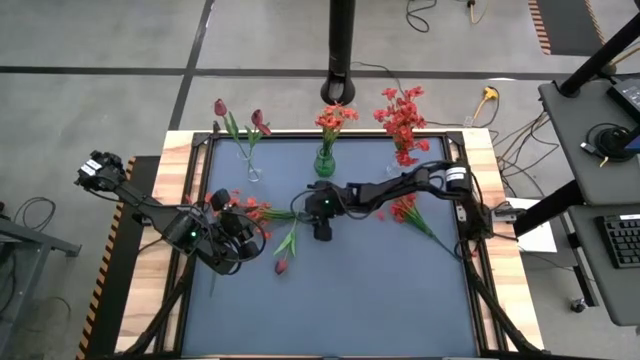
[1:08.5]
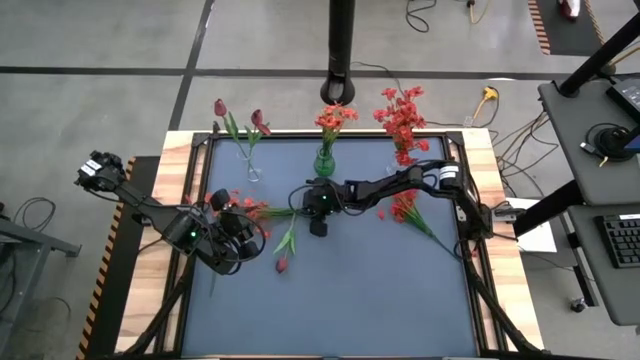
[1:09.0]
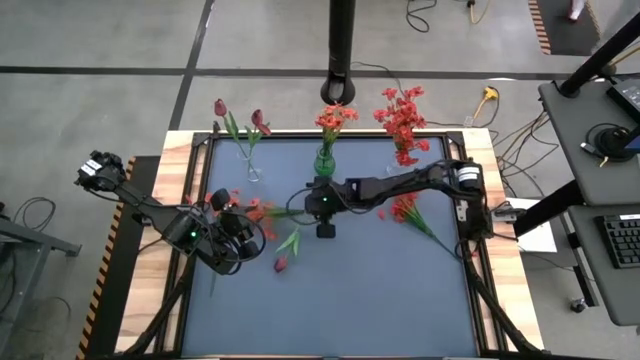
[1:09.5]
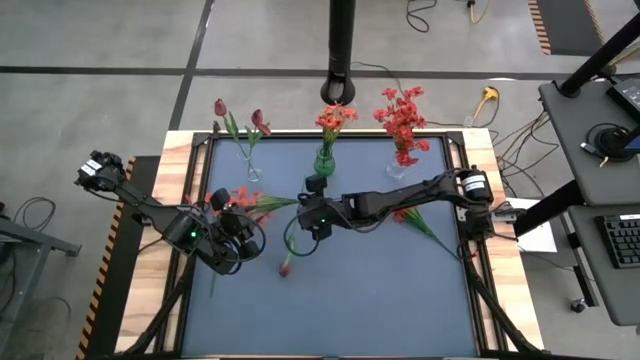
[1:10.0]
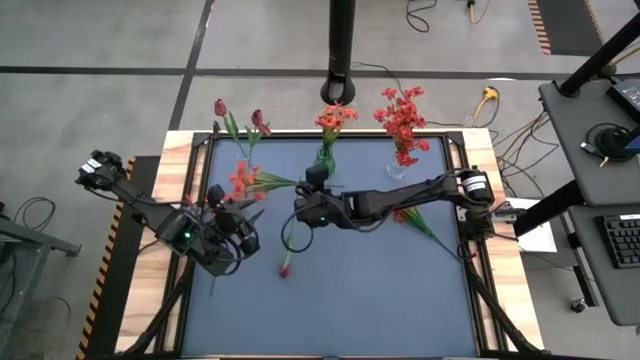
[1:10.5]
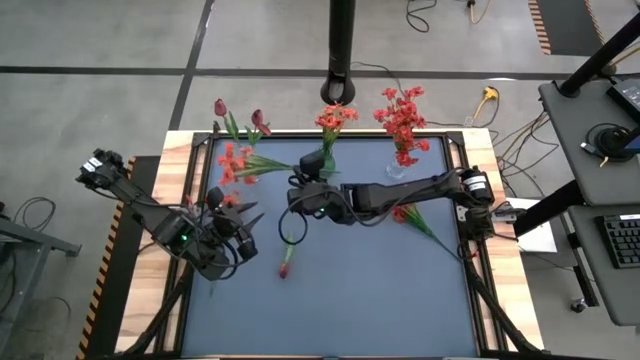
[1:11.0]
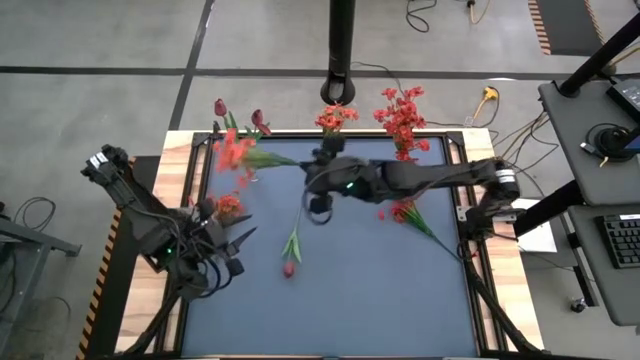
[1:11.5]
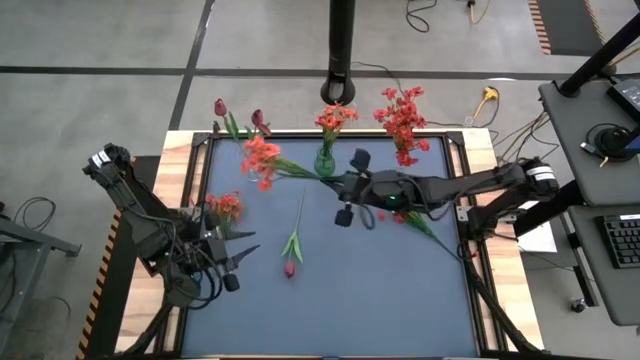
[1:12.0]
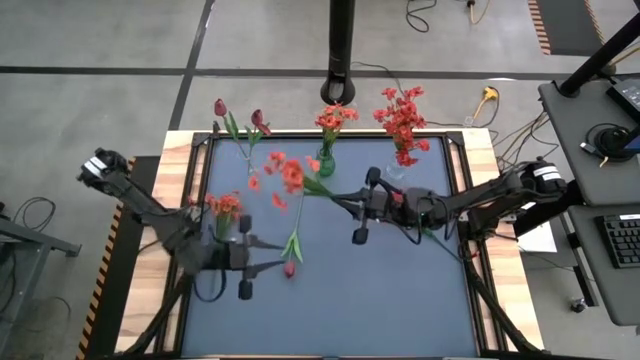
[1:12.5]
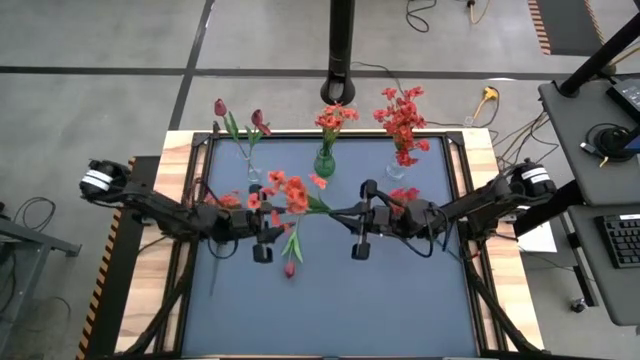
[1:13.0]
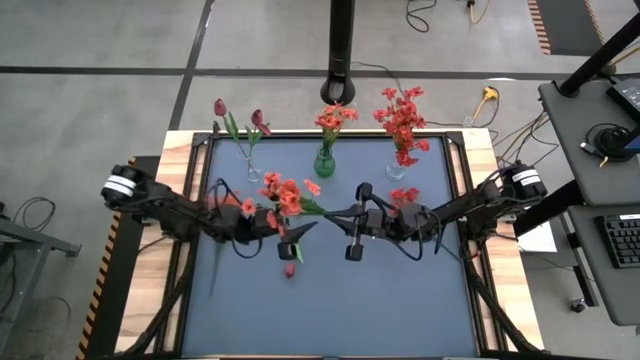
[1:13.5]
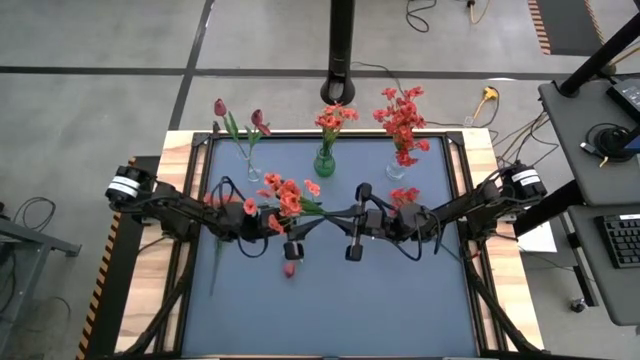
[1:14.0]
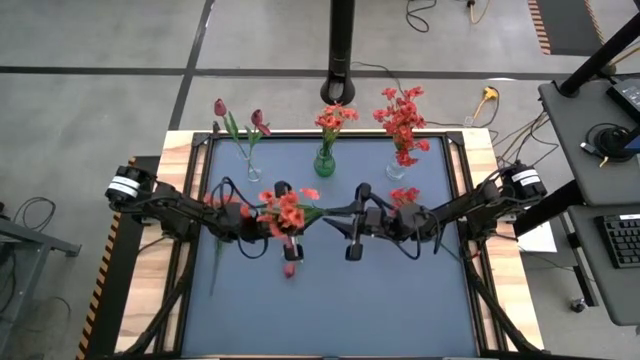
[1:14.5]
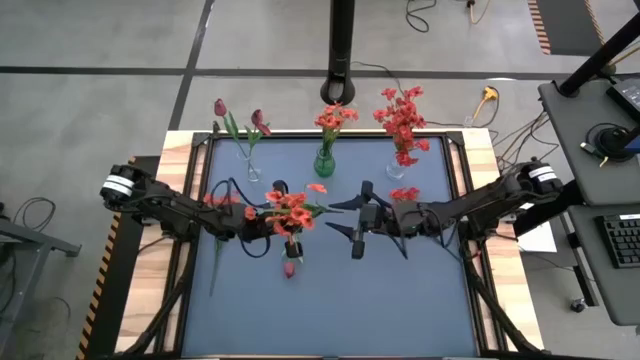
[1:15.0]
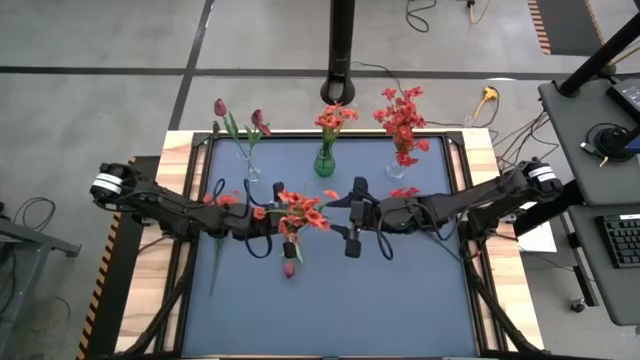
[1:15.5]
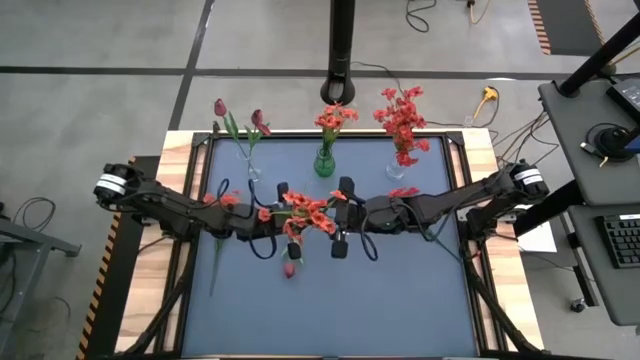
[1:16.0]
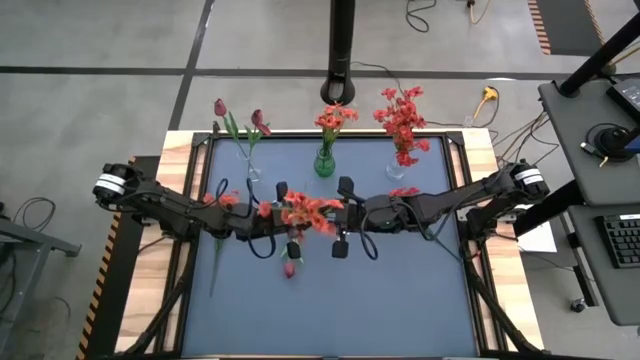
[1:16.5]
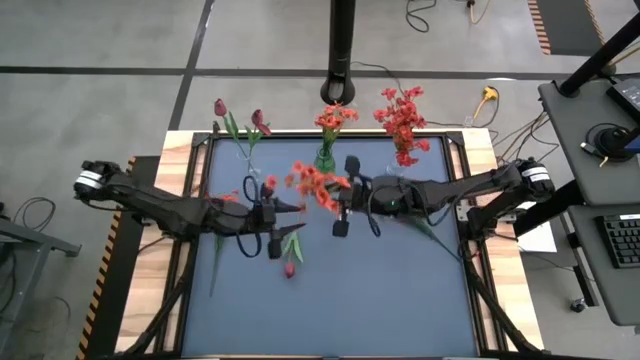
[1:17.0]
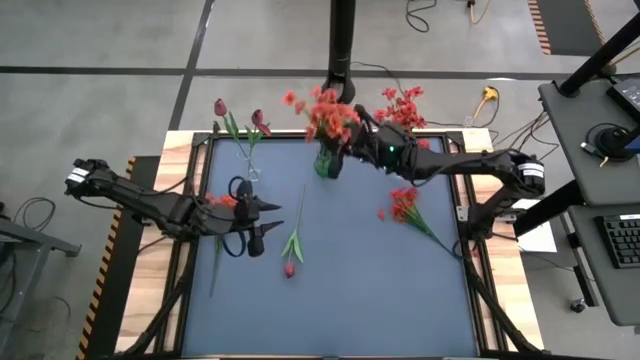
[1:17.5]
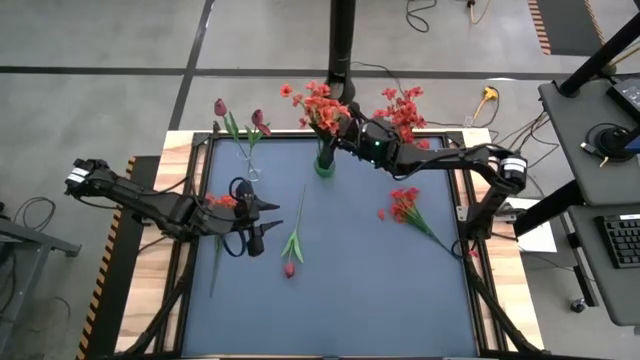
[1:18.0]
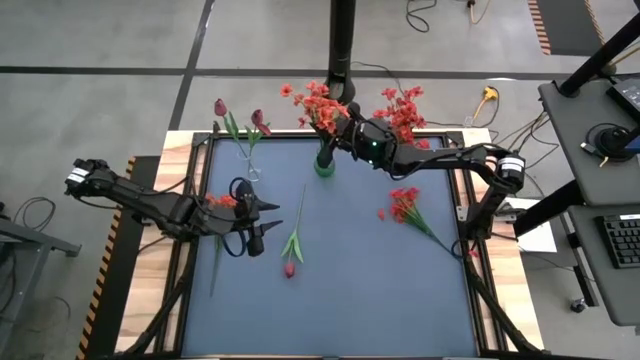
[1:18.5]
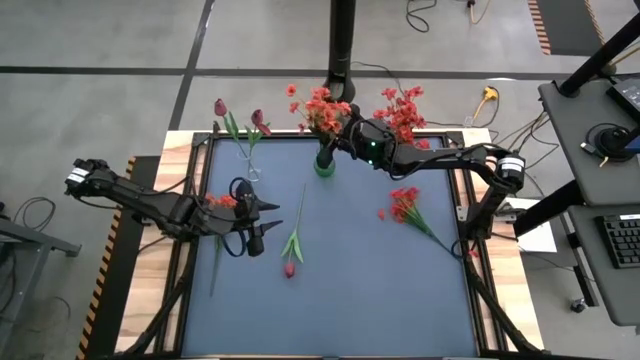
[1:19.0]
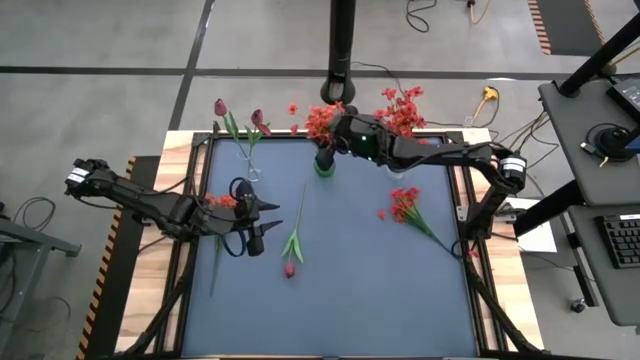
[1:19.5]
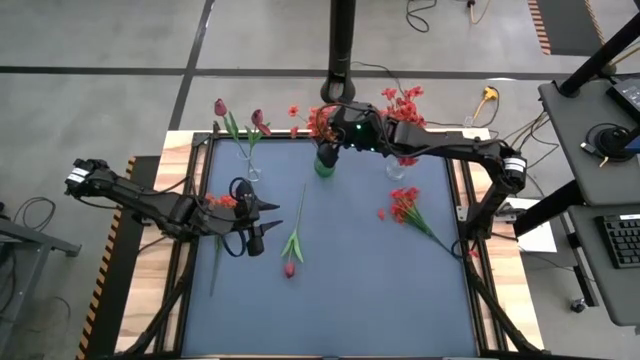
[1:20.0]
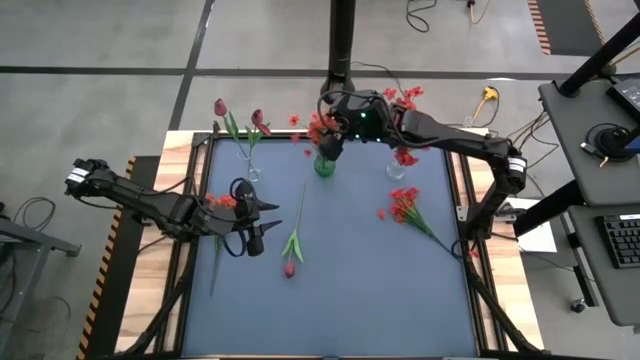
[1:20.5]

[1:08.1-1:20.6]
Task: Sort flowers into vase by color
Put the right orange flowers into the green vase

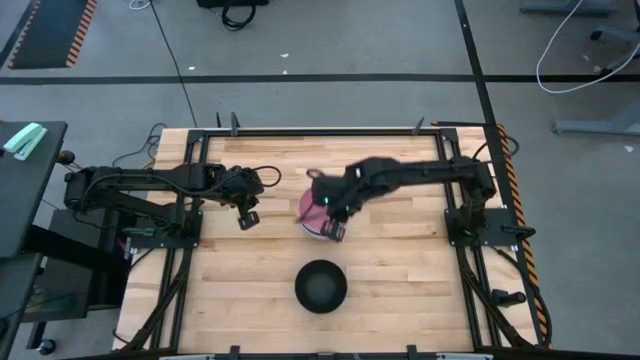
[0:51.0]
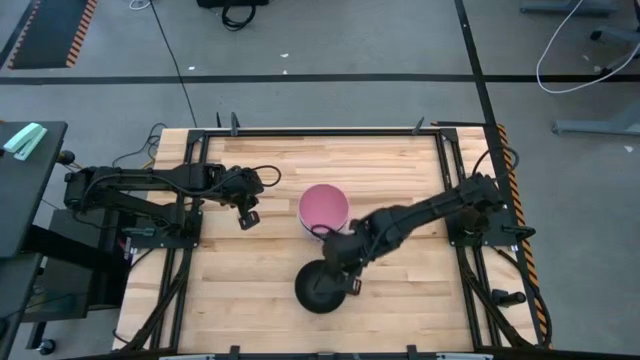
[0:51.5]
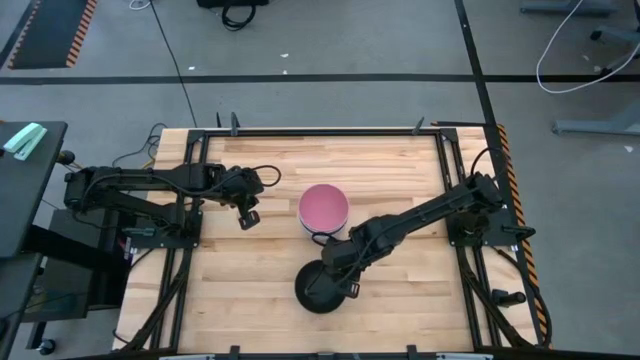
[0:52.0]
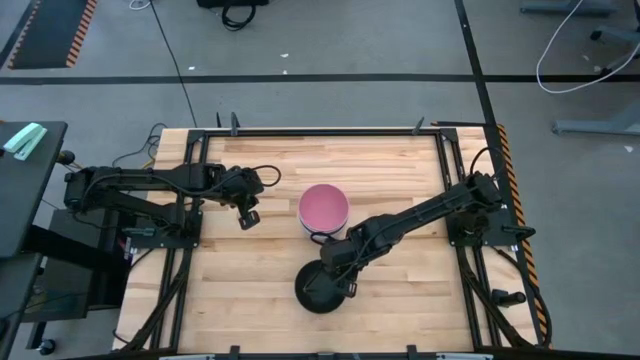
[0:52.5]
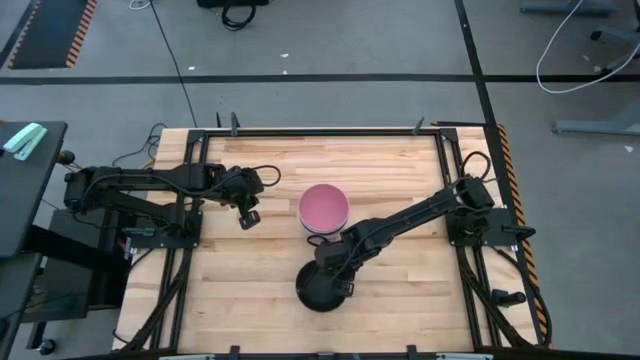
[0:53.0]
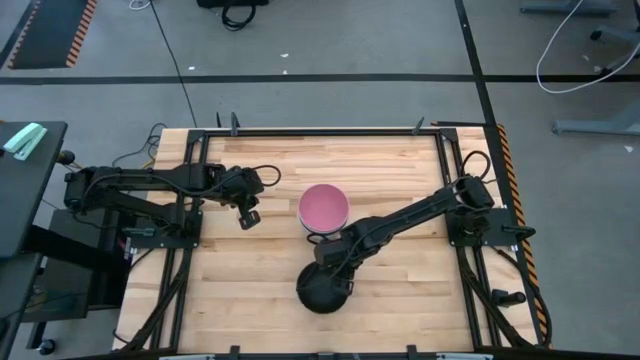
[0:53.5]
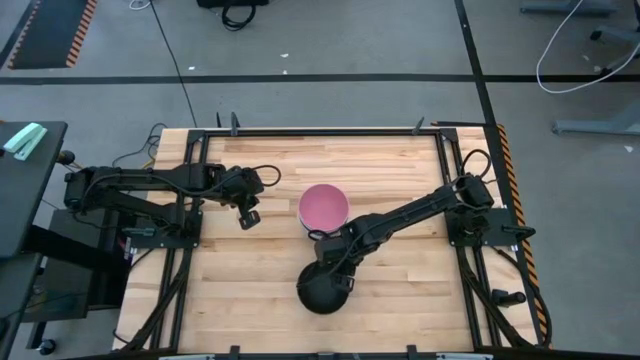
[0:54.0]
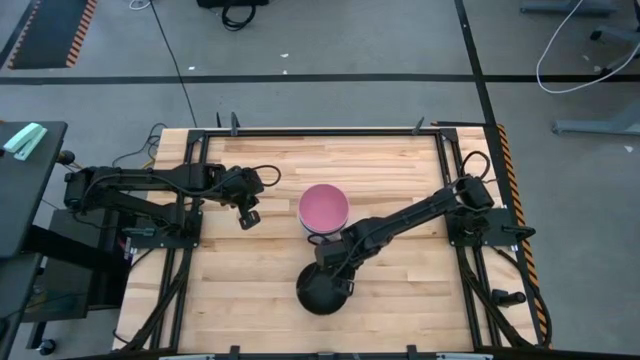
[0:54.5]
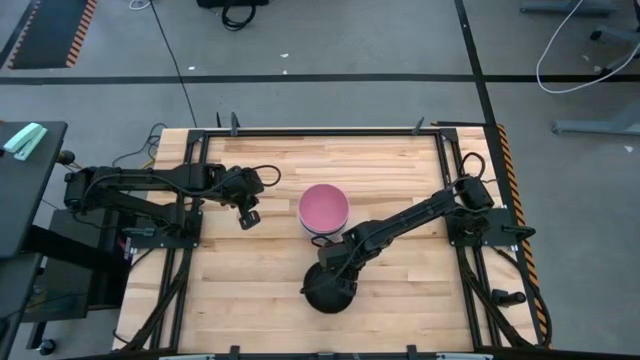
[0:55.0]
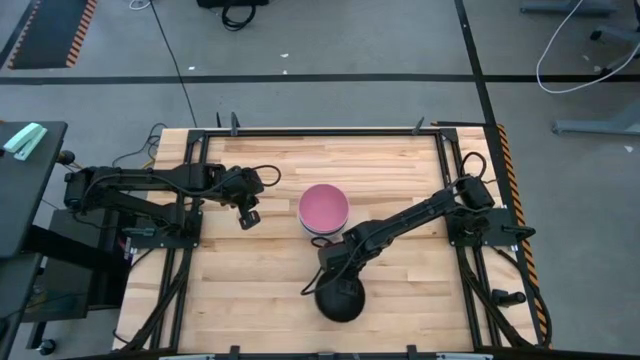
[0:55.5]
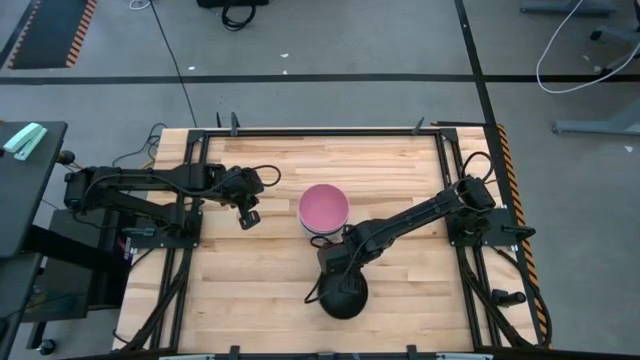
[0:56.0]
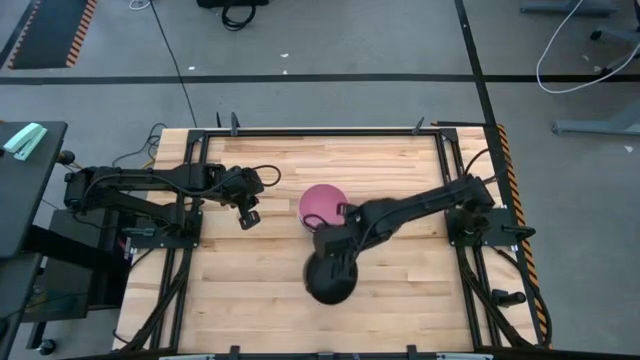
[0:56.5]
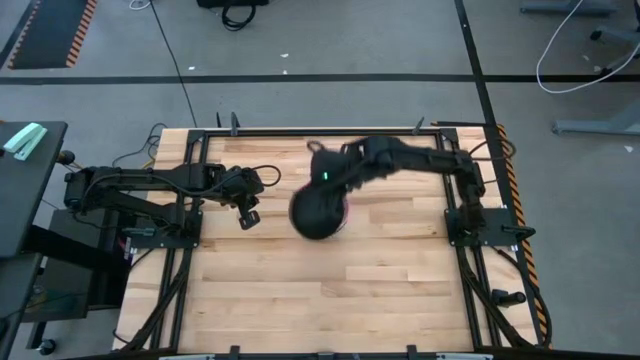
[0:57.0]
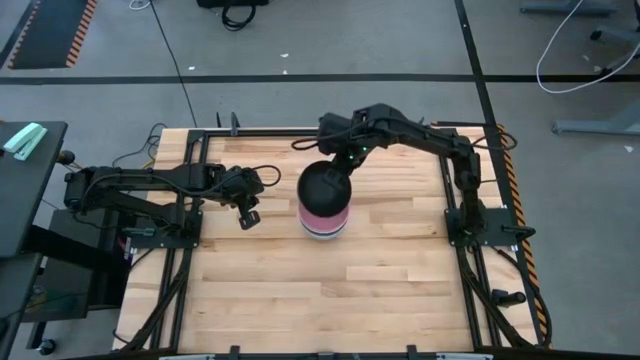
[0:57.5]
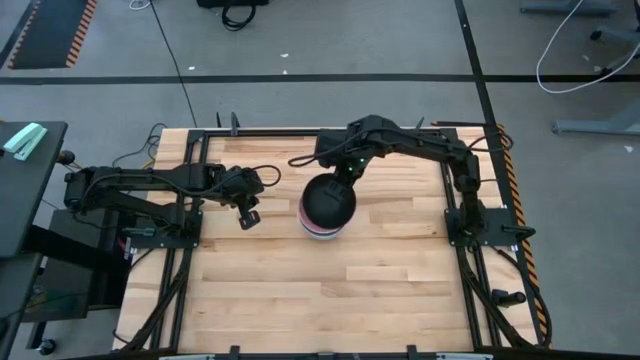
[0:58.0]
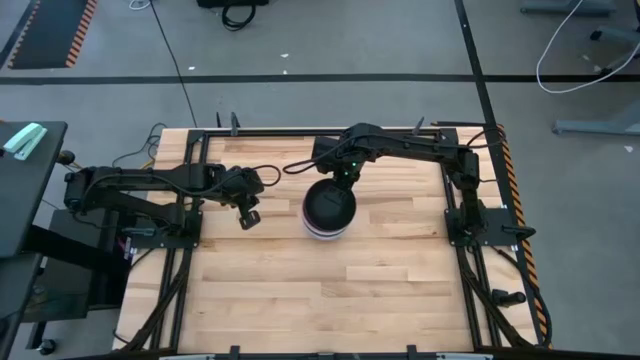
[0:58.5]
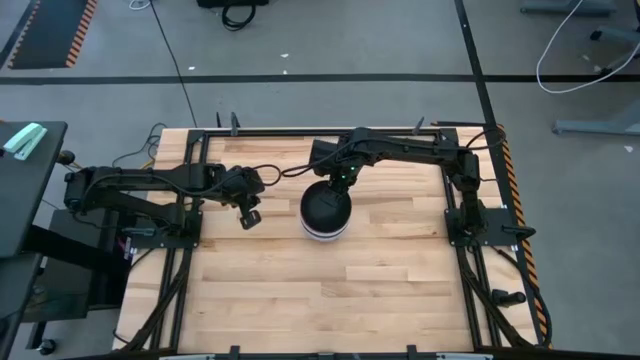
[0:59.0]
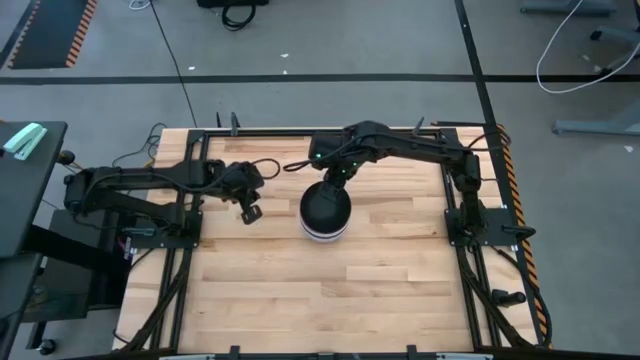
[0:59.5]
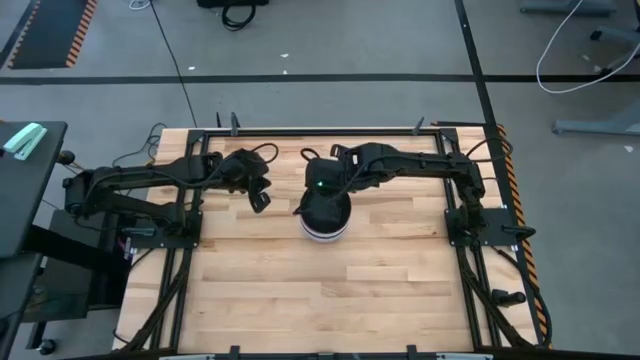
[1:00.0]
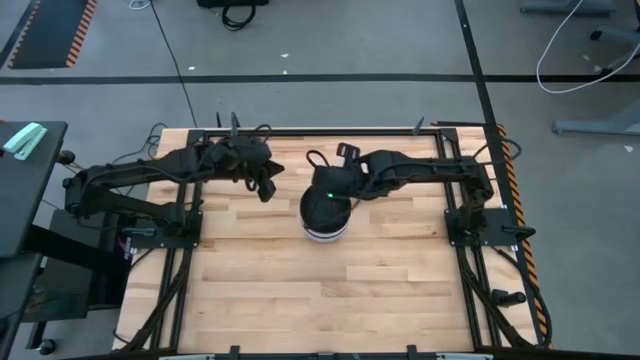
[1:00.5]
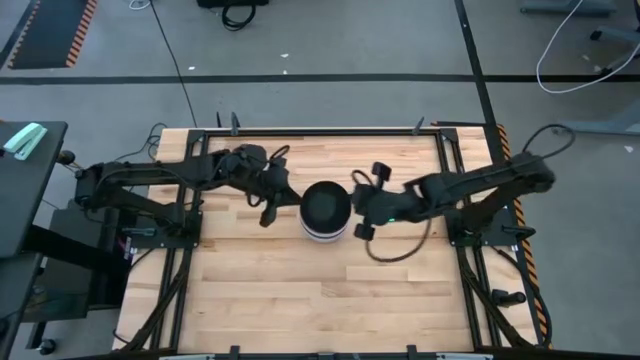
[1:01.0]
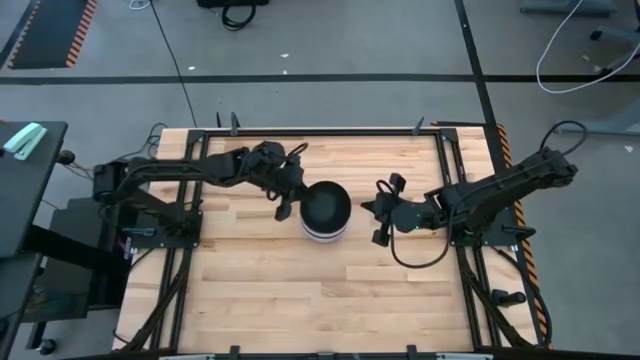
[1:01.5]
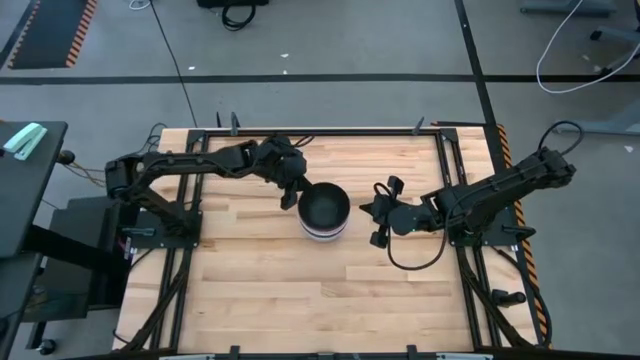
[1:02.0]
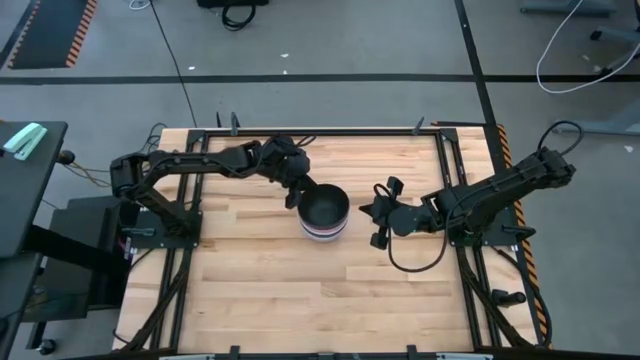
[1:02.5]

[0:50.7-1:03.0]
Task: Nest bowls inside each other
Stack the black bowl on top of the pink bowl
